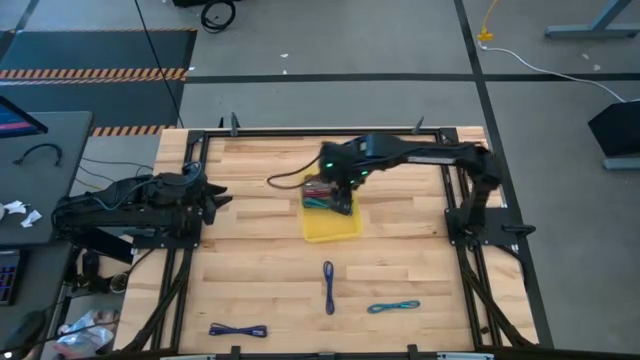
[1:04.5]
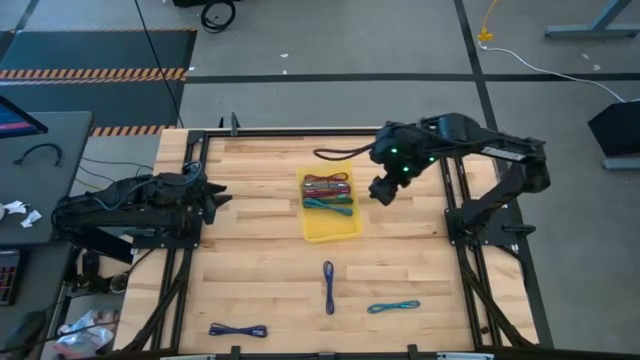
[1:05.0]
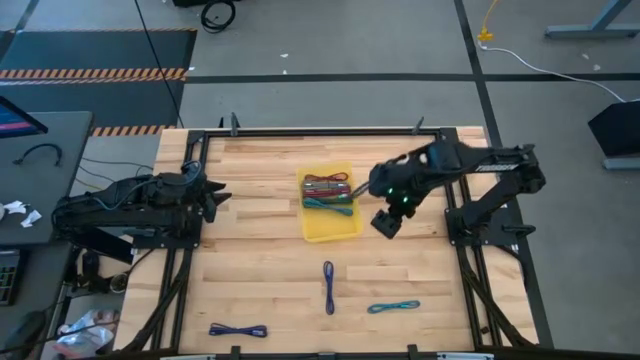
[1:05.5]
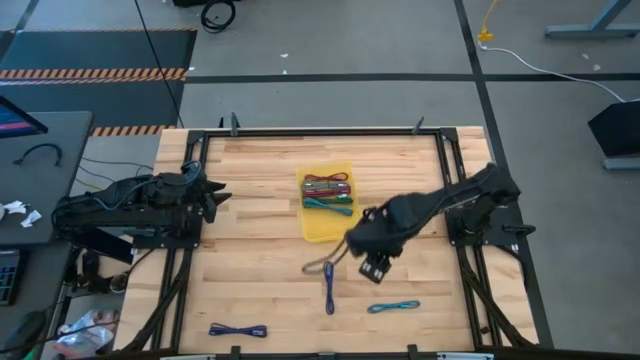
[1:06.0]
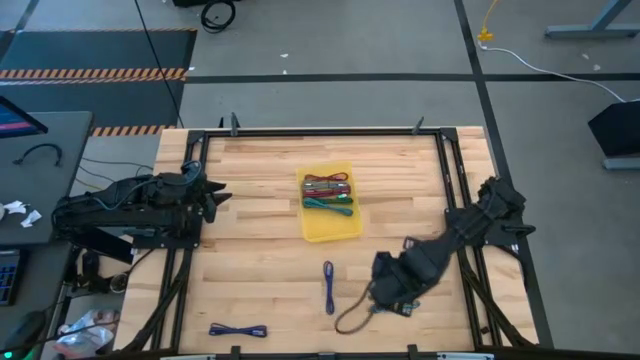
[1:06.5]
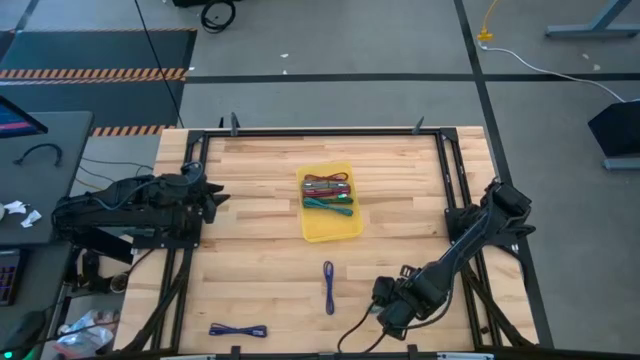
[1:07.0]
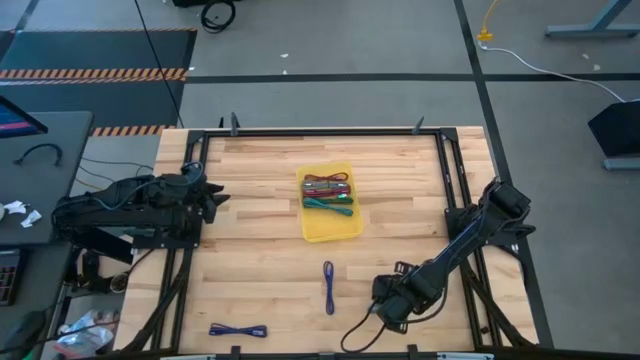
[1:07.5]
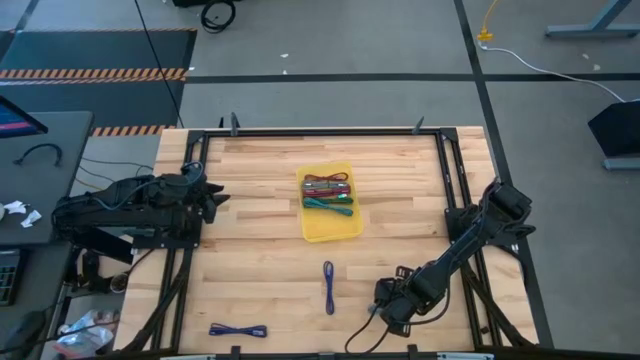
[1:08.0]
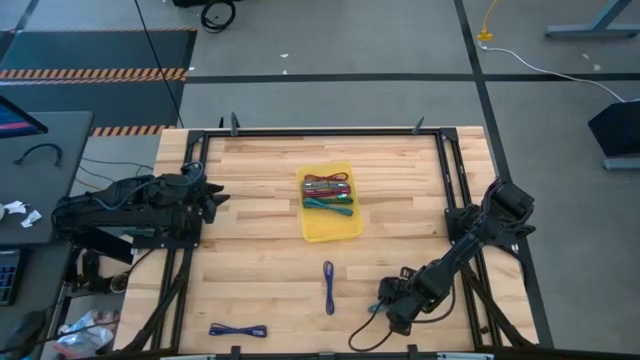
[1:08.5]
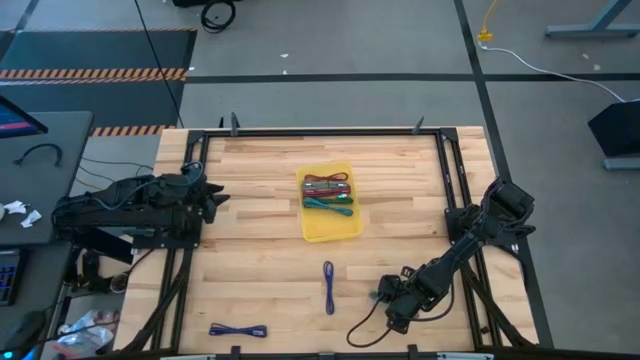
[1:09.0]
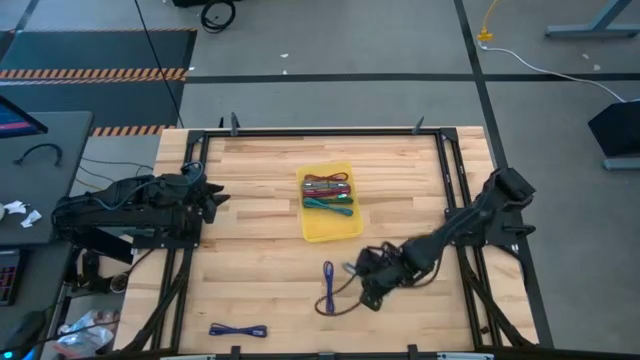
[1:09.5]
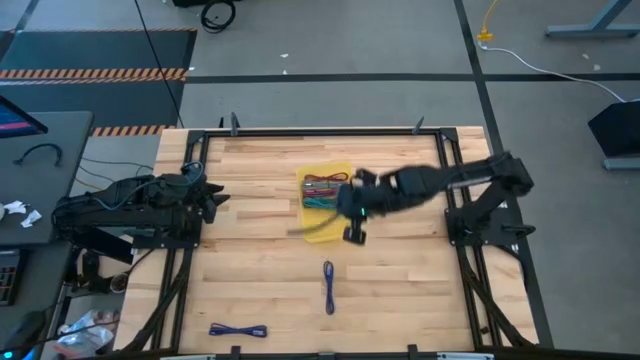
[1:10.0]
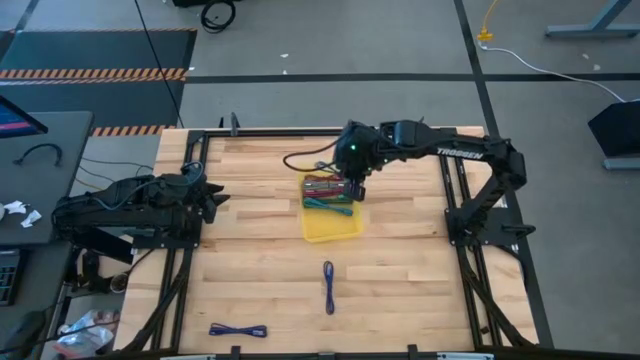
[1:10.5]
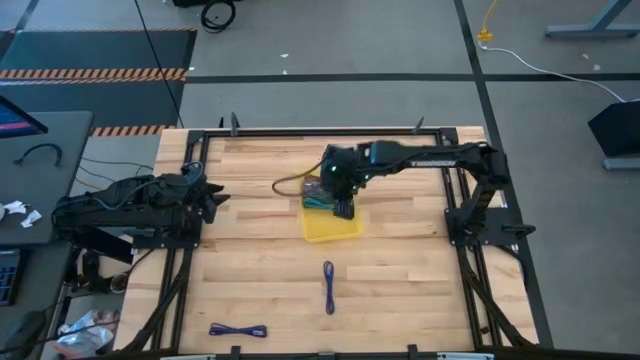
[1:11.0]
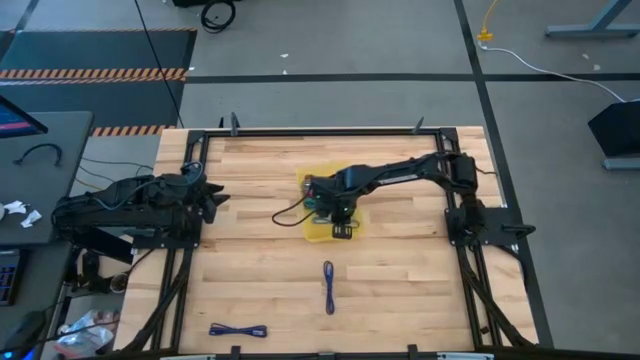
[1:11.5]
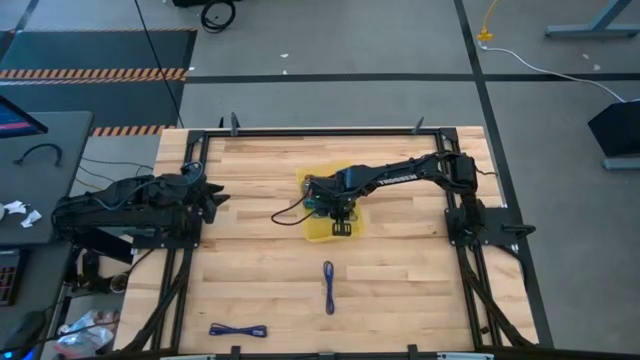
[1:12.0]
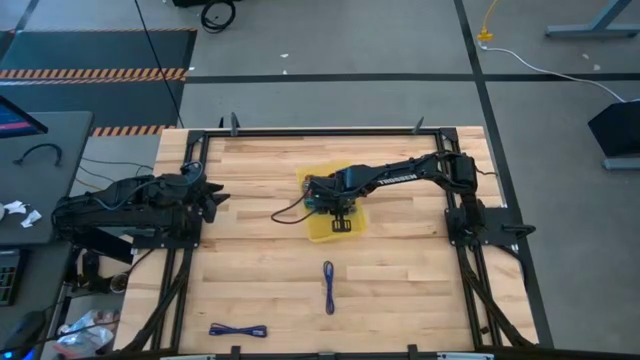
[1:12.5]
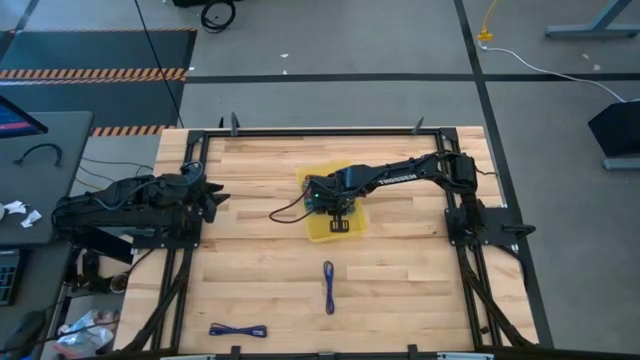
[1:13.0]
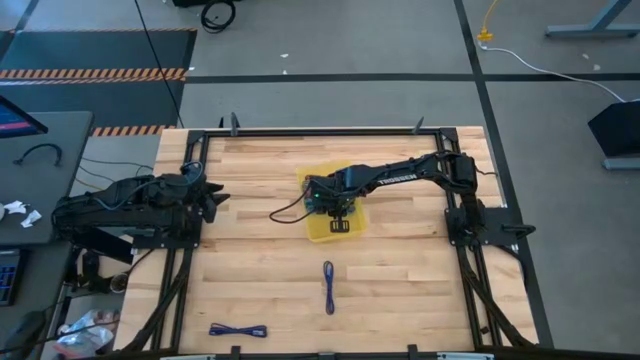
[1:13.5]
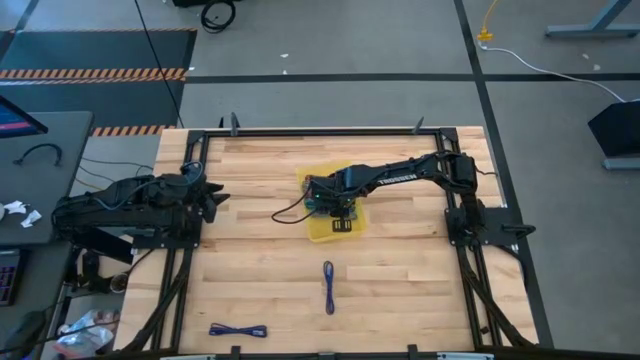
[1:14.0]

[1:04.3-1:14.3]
Task: Pick and place USB-C Cables
Put the light blue charger cable into the yellow bin

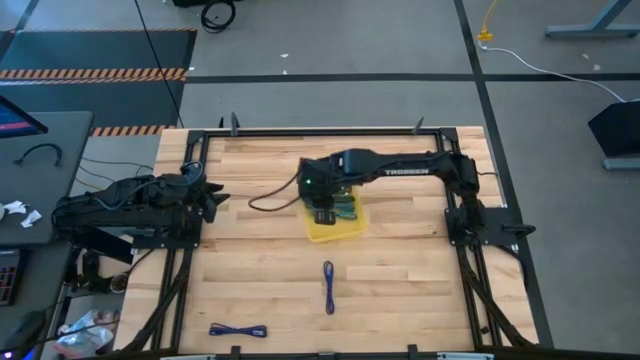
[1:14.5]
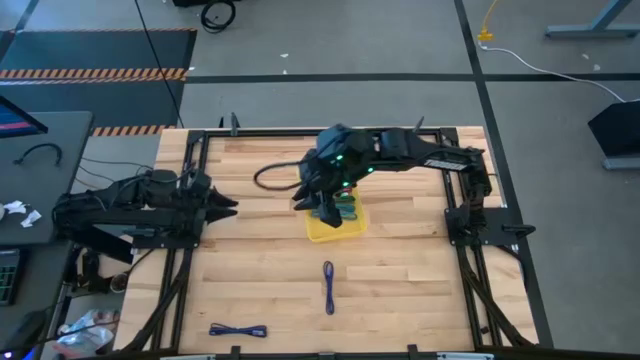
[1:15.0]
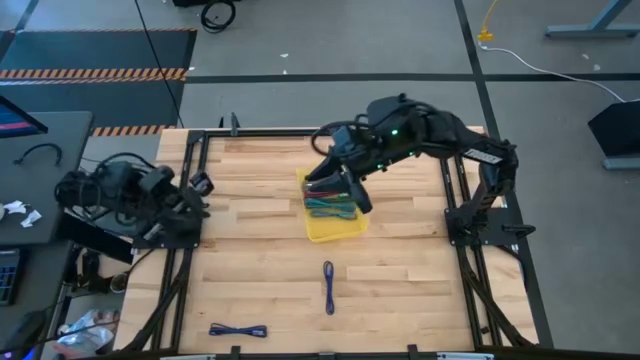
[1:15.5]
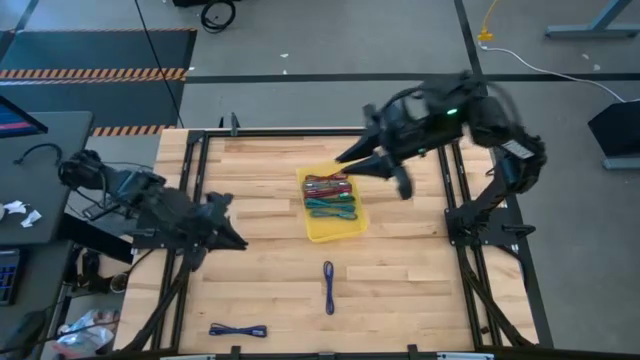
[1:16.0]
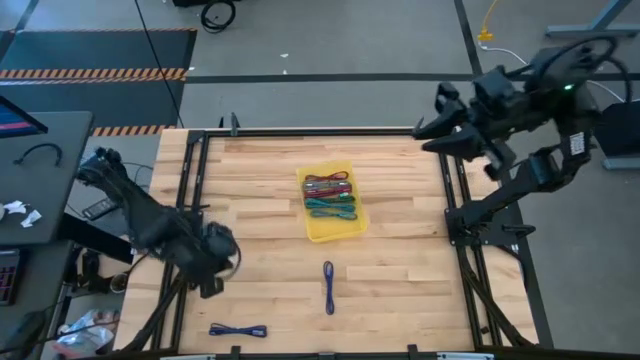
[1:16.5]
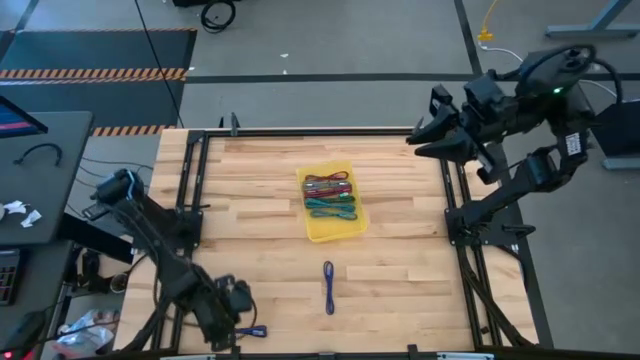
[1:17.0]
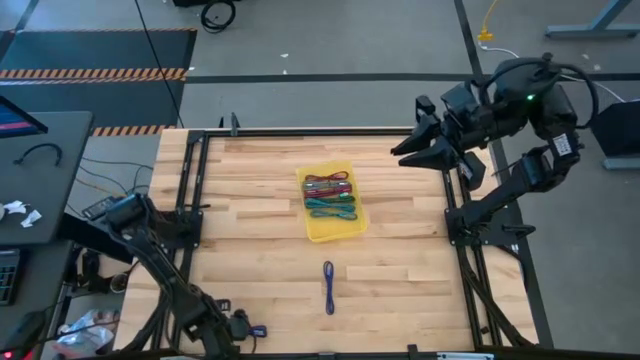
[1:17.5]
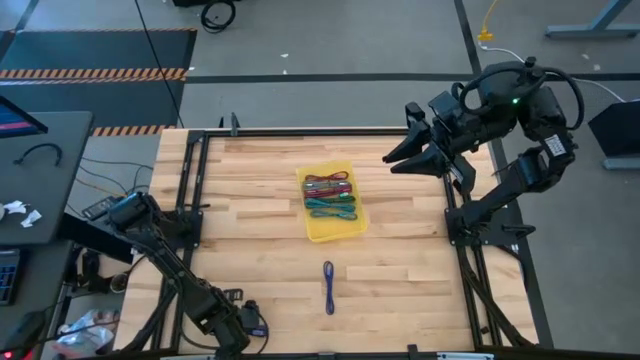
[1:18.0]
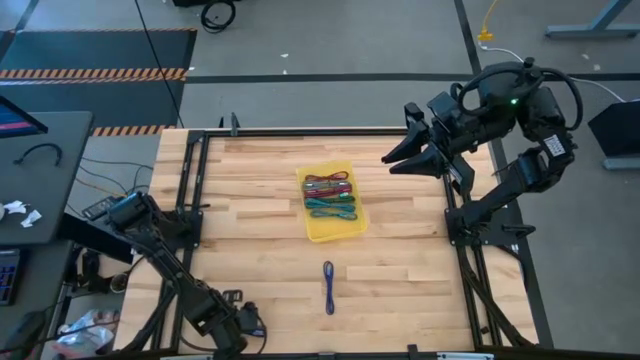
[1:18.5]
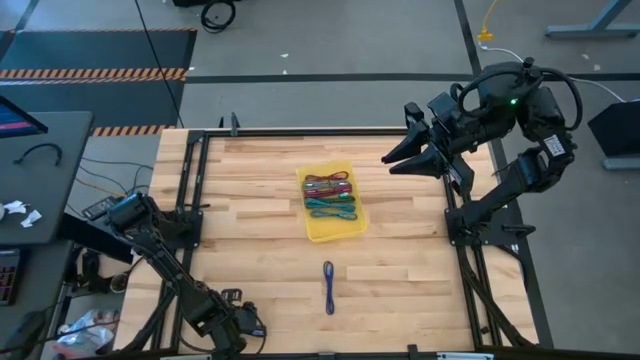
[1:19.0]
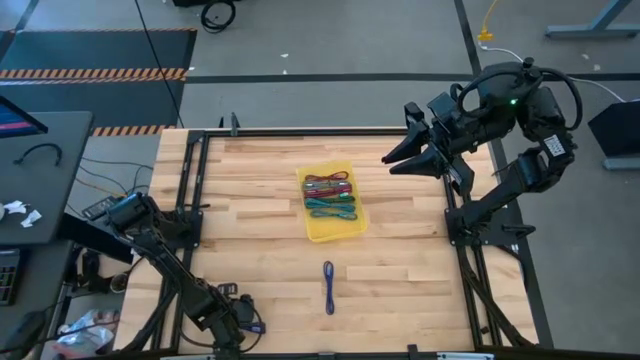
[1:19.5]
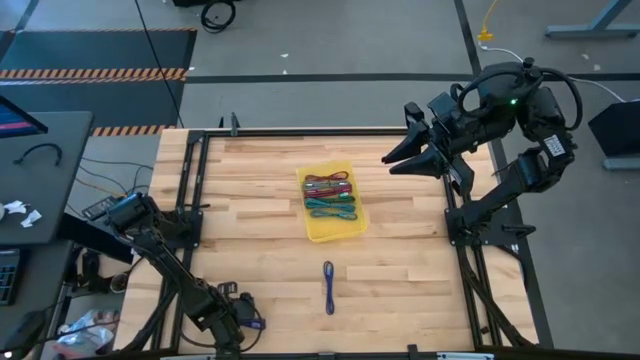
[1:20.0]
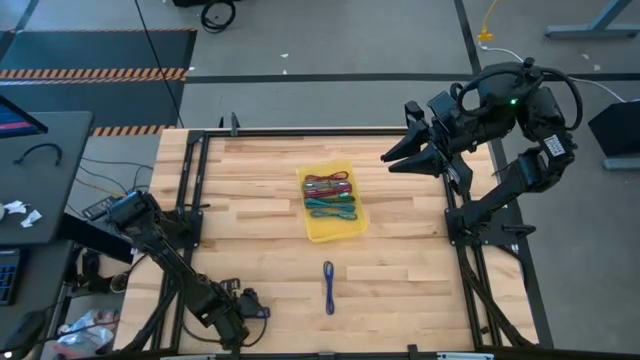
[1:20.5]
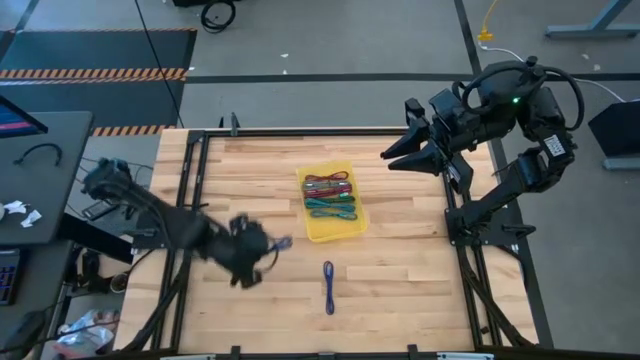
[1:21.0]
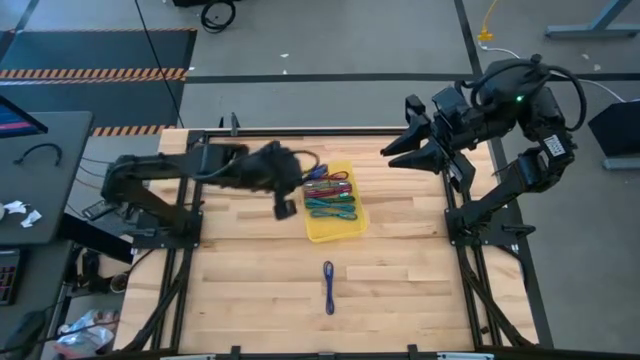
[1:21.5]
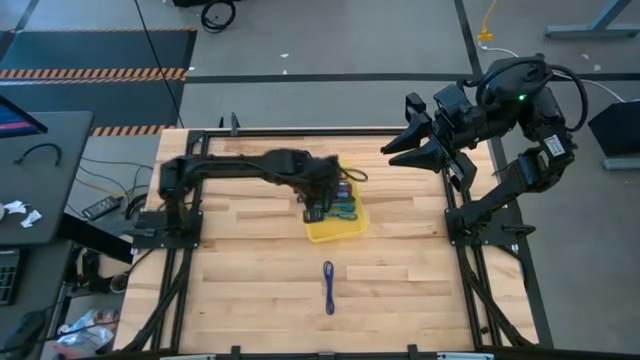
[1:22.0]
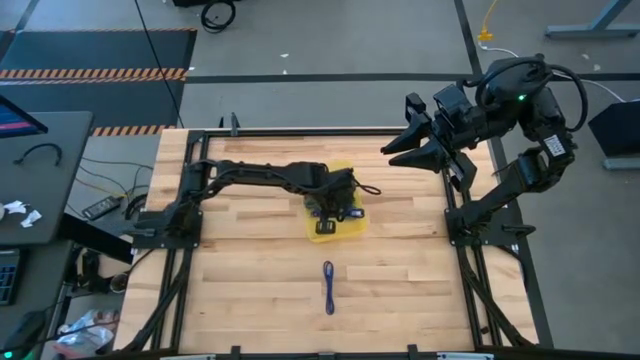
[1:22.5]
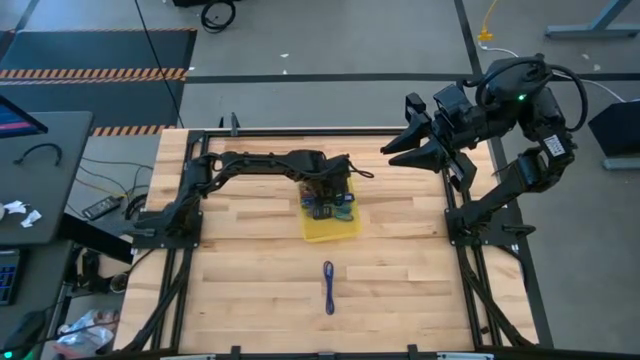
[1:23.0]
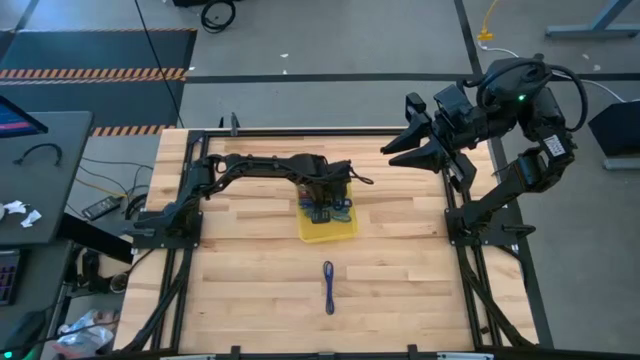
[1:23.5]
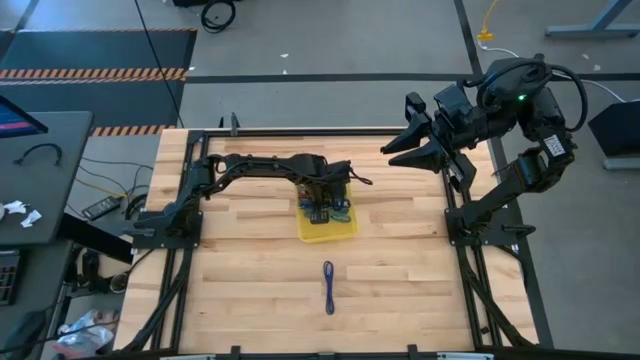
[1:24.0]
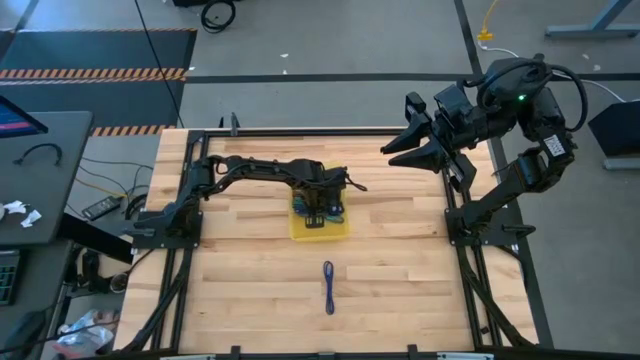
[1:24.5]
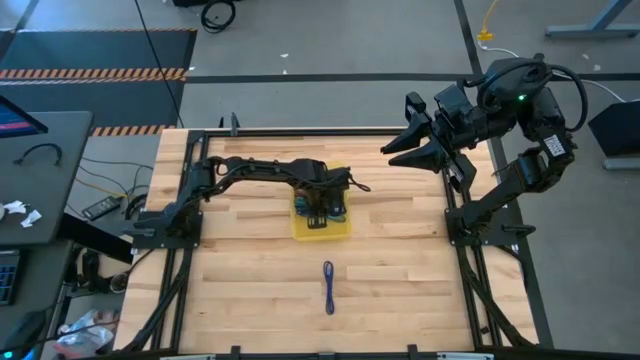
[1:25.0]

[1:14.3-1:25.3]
Put the left dark blue charger cable into the yellow bin

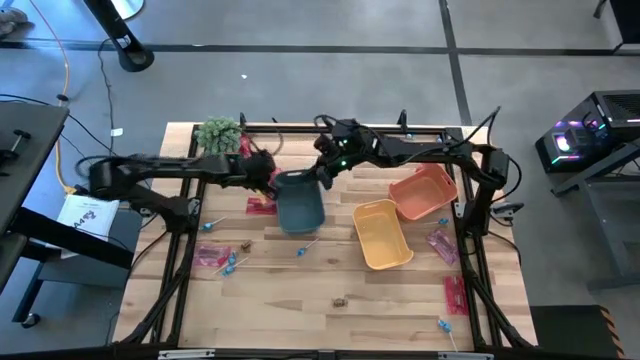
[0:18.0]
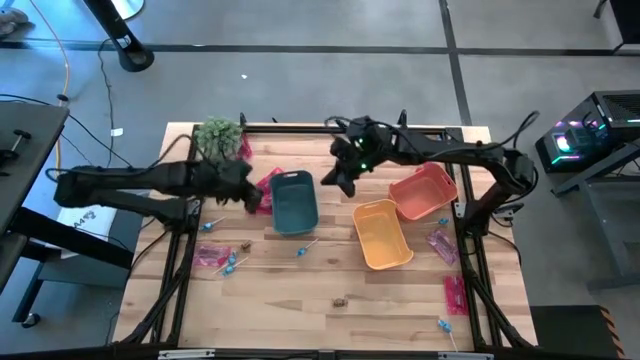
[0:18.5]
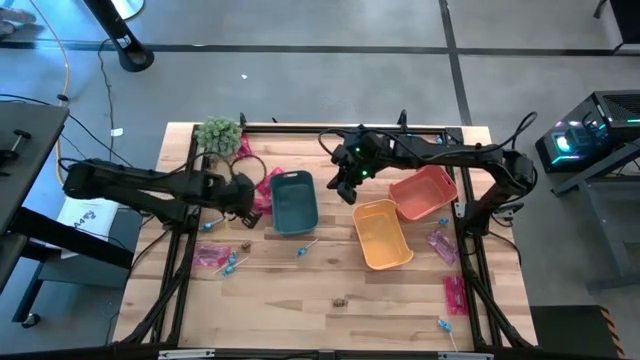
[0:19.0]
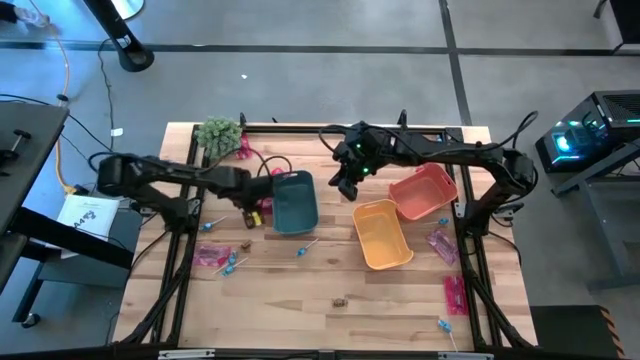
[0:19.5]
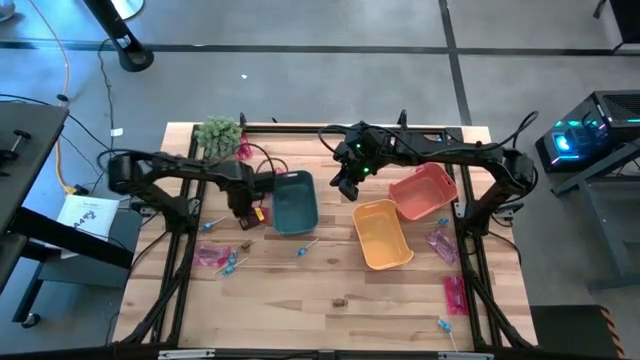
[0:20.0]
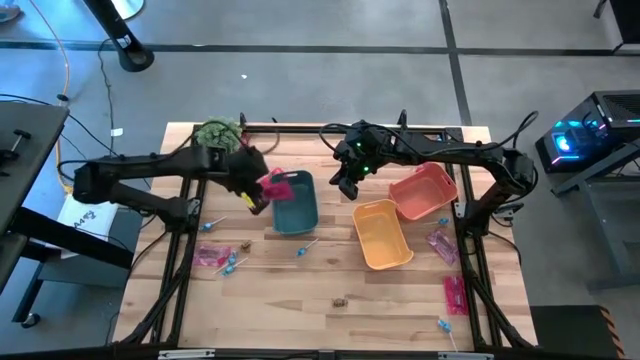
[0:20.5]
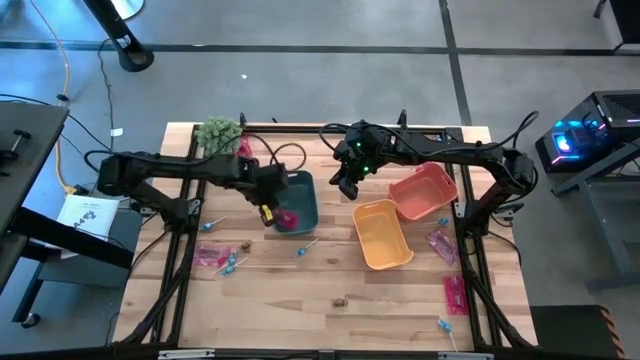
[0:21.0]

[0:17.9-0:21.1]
Task: Sort candy
Put the red candy pack into the blue bin
